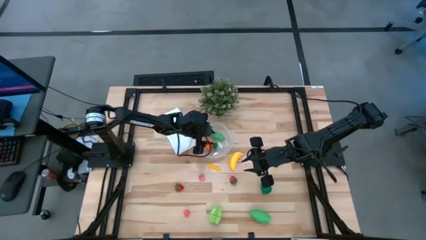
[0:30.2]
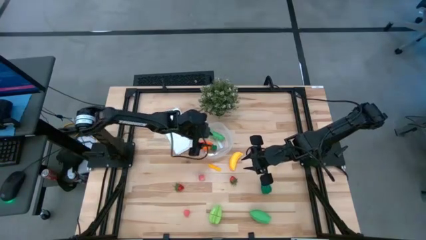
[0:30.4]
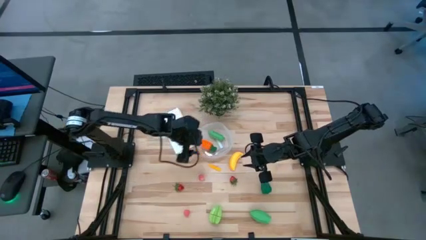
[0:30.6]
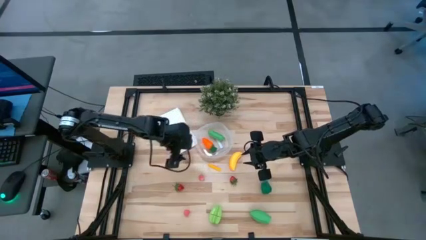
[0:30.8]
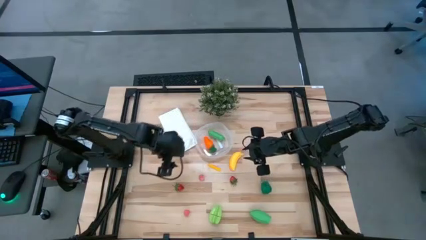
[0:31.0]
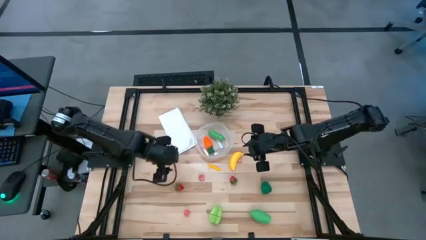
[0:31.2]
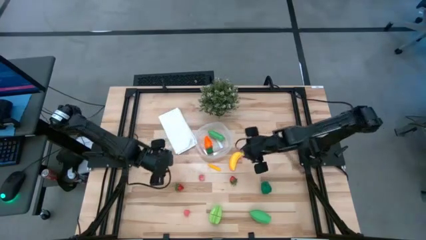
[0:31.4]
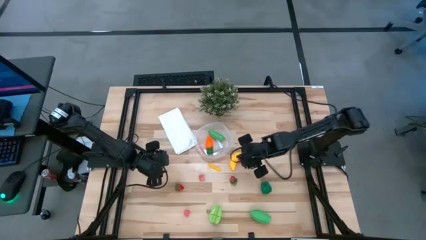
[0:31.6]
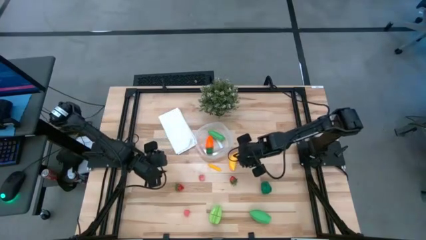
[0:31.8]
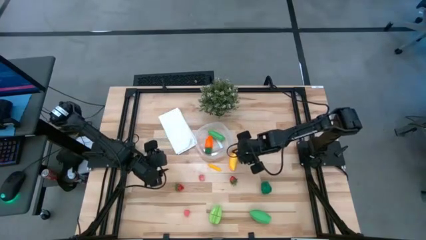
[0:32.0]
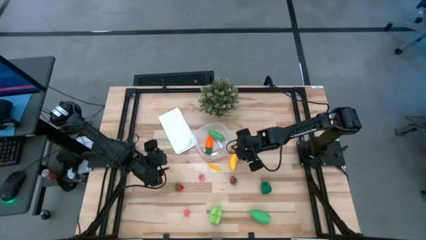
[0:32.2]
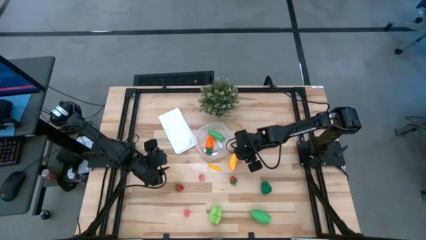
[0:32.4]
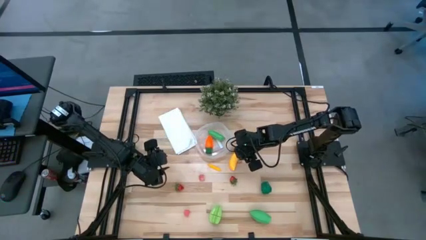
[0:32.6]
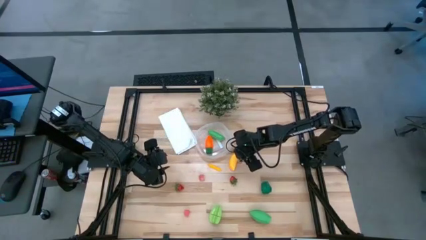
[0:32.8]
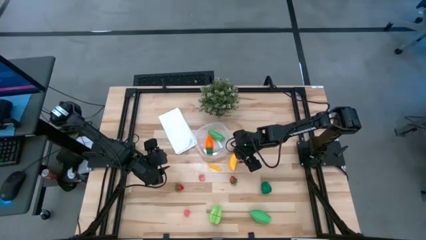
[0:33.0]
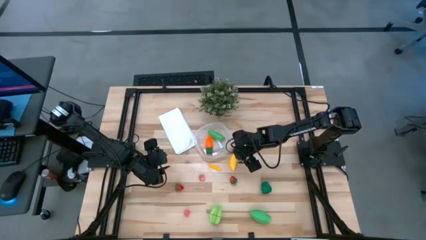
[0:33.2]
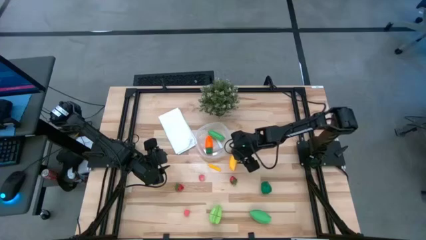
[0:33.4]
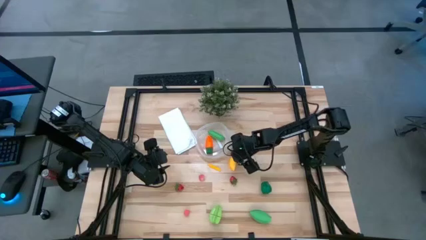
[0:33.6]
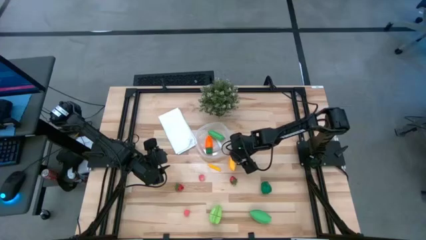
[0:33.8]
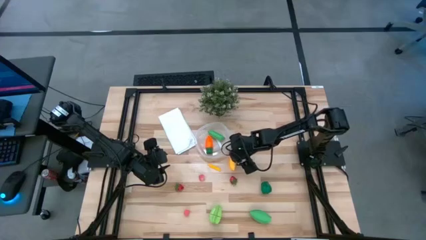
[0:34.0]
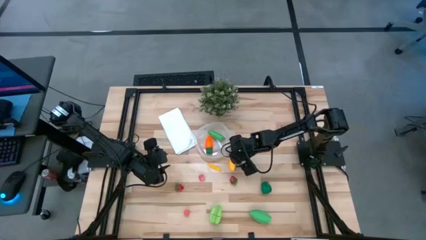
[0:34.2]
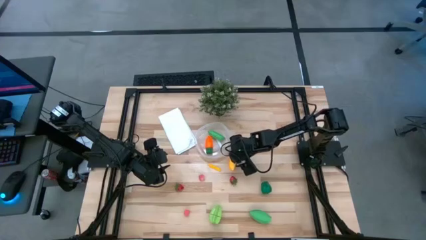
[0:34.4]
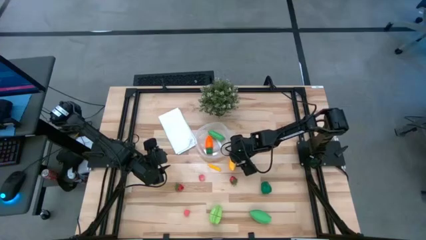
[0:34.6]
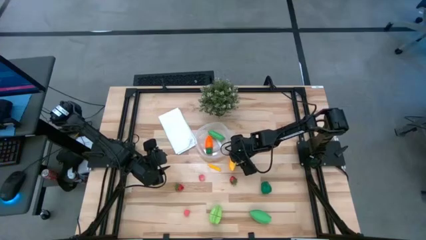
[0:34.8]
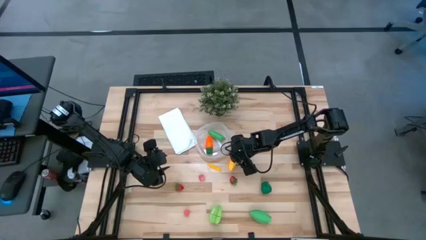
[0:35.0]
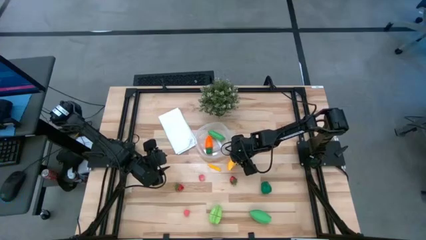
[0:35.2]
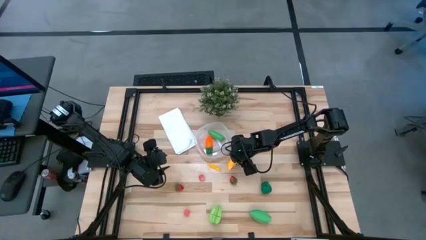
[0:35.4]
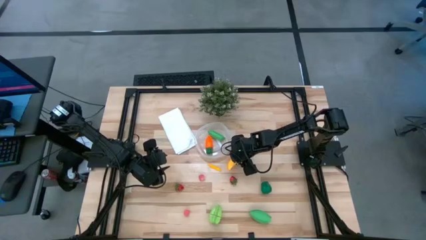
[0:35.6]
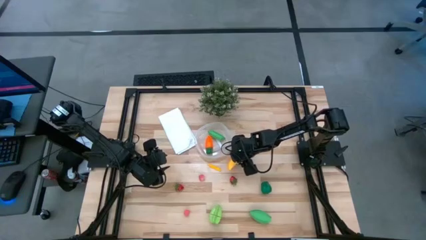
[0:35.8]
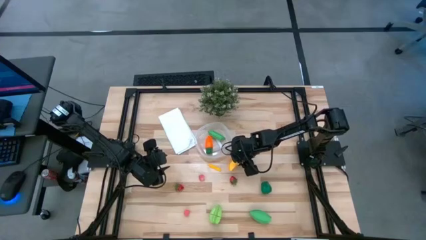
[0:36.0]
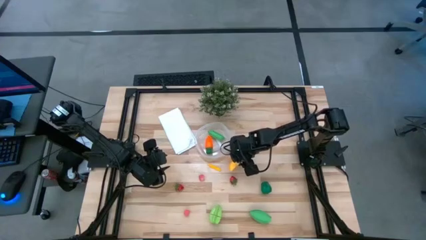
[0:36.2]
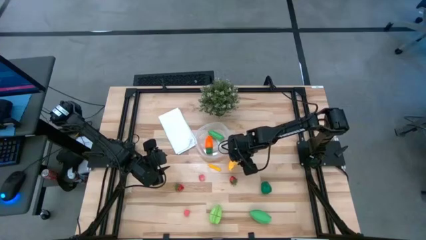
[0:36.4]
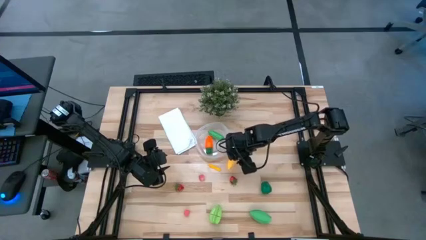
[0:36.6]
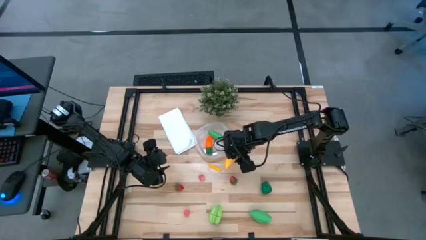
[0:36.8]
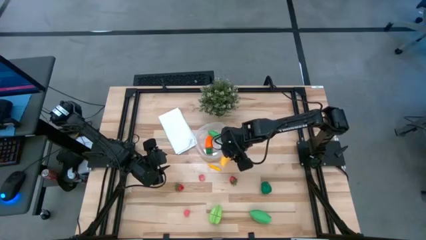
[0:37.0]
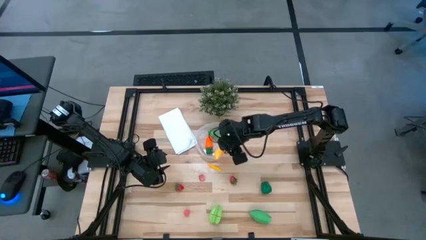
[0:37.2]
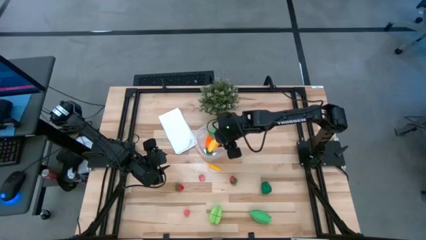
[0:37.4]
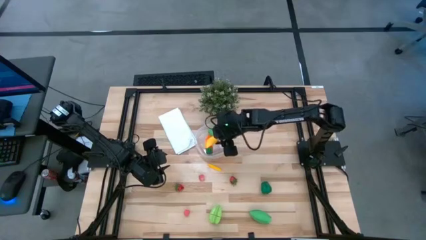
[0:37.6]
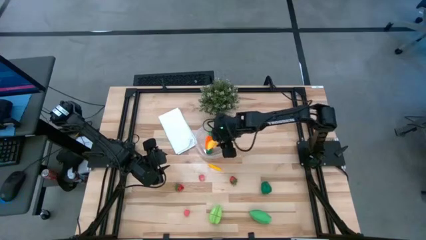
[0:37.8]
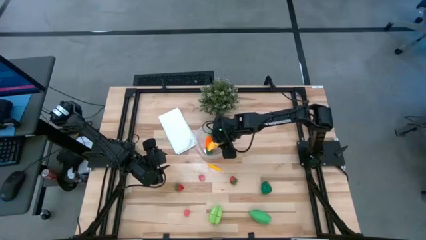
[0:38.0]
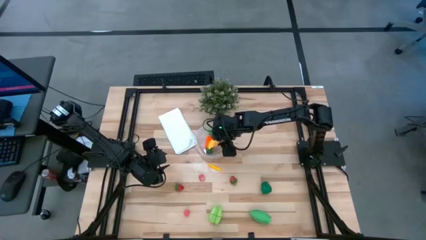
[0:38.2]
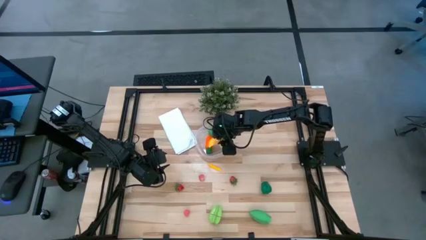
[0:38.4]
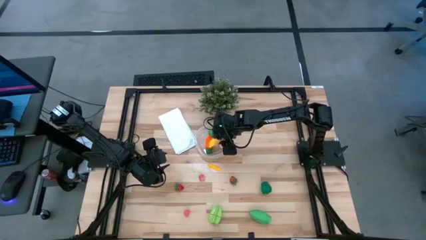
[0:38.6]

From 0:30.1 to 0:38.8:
Task: Pick and placing Produce into tupperware
Put the yellow banana into the transparent bin

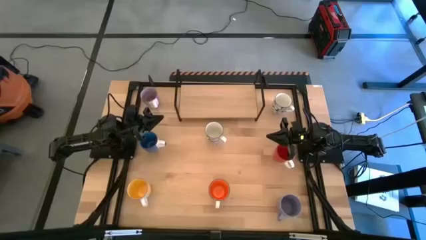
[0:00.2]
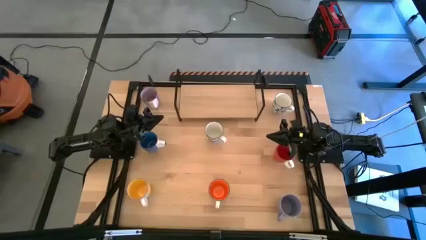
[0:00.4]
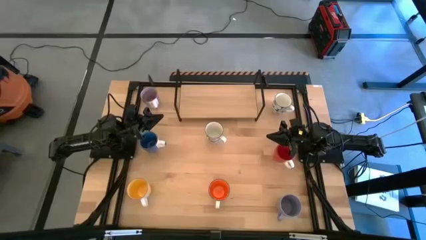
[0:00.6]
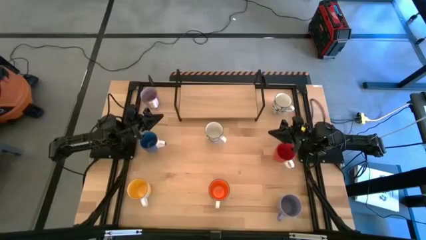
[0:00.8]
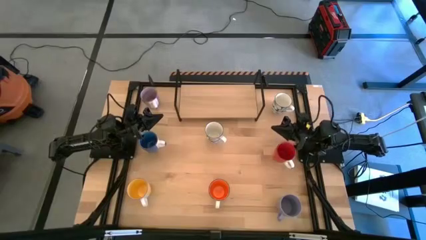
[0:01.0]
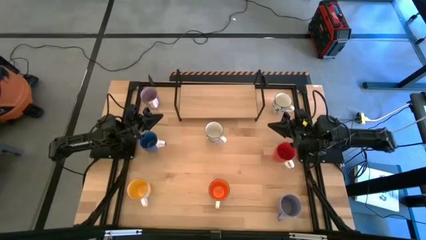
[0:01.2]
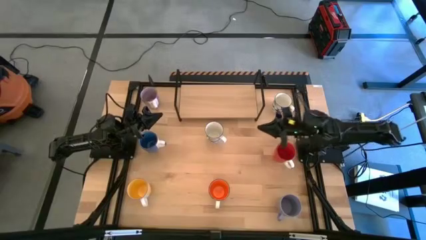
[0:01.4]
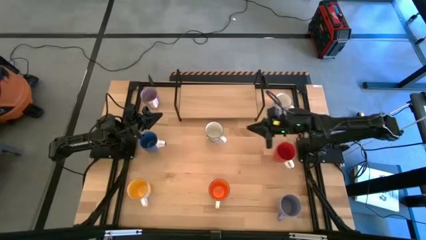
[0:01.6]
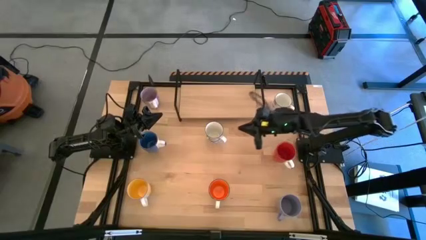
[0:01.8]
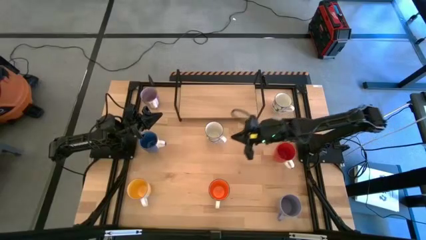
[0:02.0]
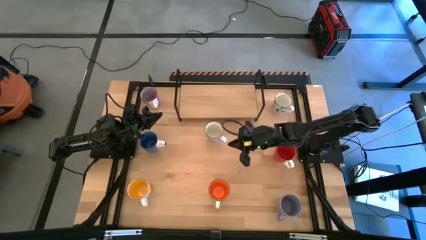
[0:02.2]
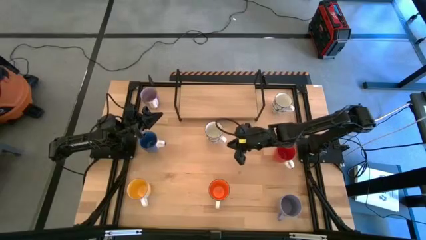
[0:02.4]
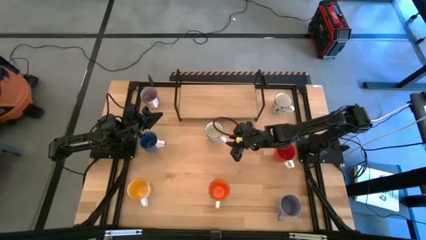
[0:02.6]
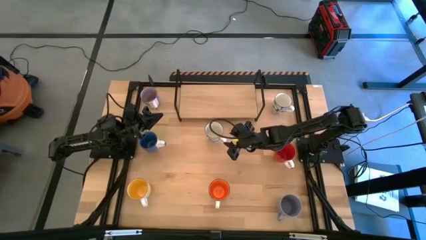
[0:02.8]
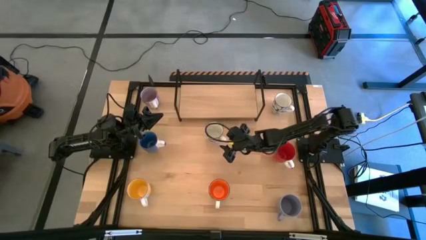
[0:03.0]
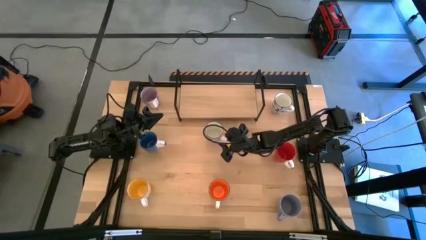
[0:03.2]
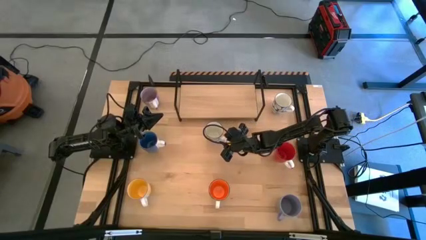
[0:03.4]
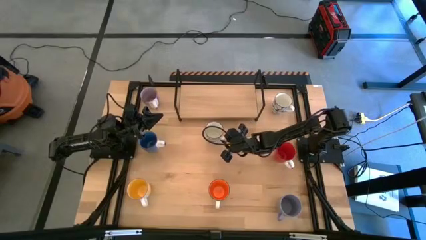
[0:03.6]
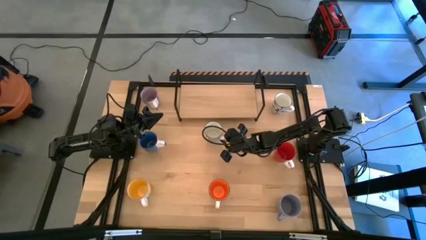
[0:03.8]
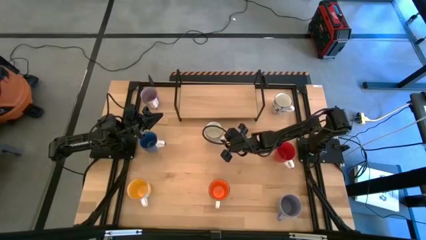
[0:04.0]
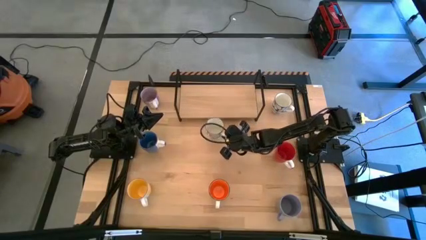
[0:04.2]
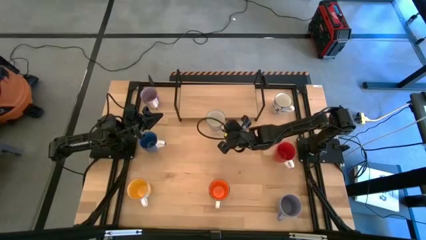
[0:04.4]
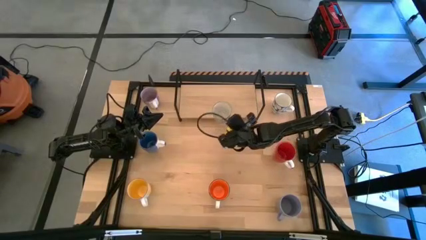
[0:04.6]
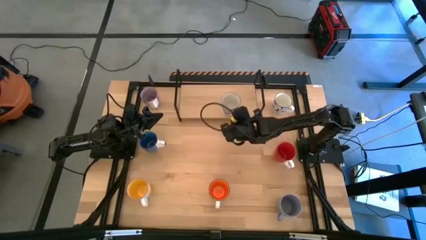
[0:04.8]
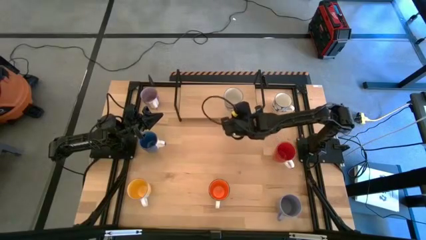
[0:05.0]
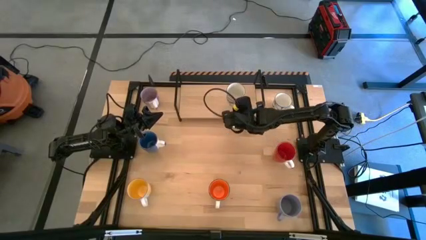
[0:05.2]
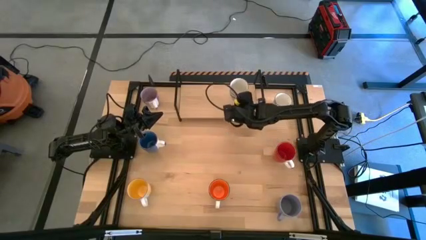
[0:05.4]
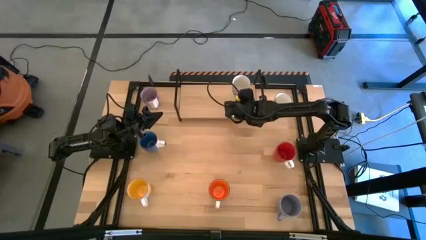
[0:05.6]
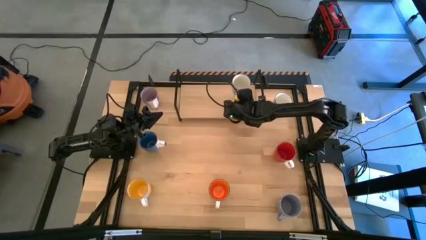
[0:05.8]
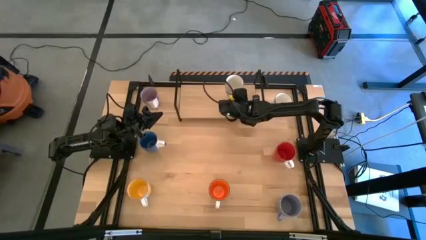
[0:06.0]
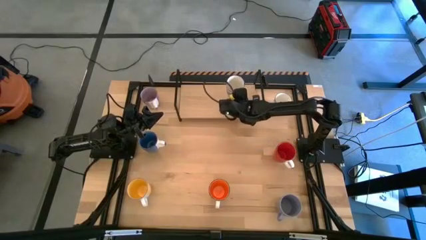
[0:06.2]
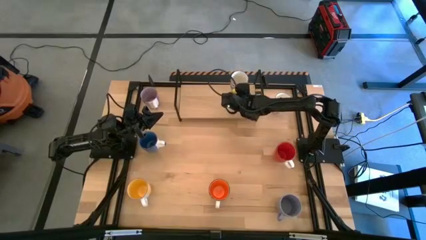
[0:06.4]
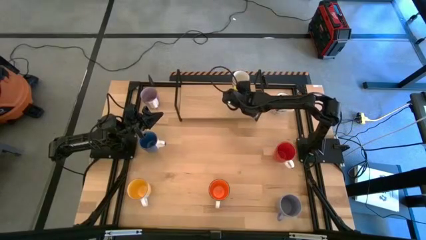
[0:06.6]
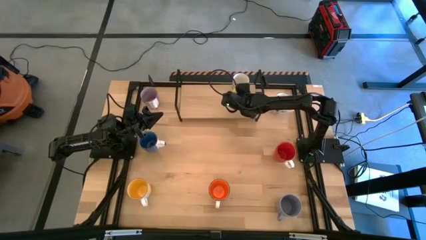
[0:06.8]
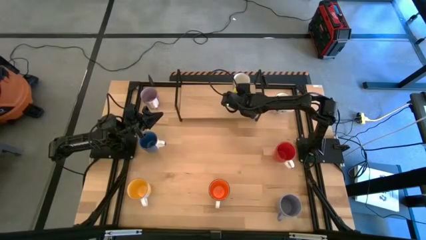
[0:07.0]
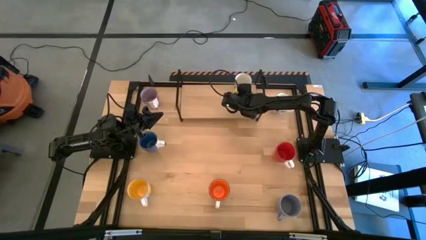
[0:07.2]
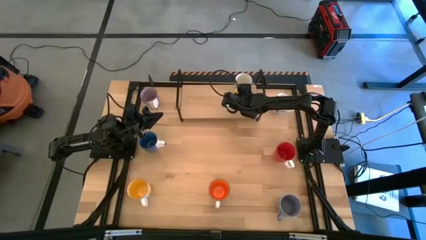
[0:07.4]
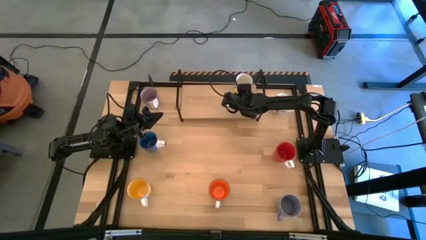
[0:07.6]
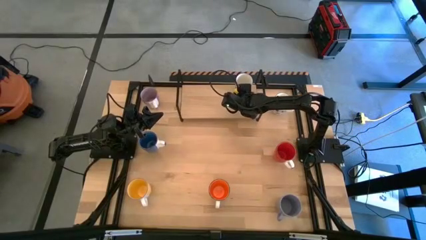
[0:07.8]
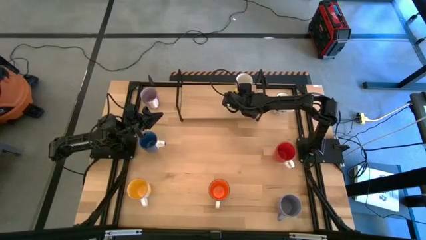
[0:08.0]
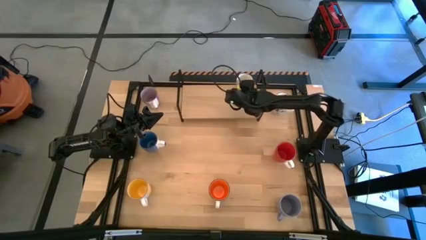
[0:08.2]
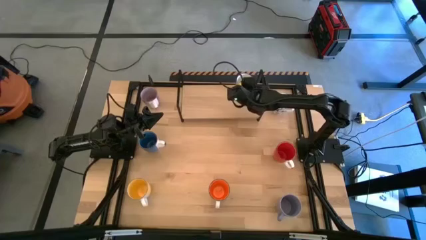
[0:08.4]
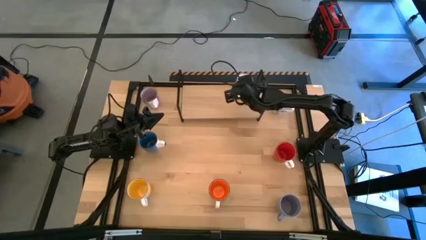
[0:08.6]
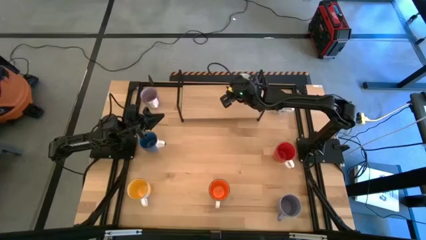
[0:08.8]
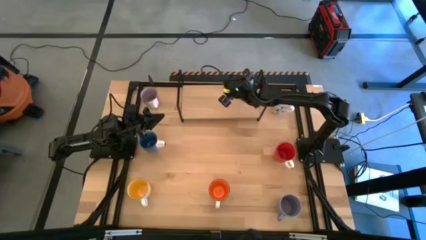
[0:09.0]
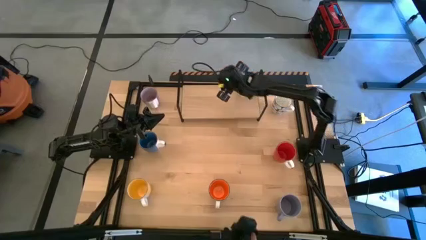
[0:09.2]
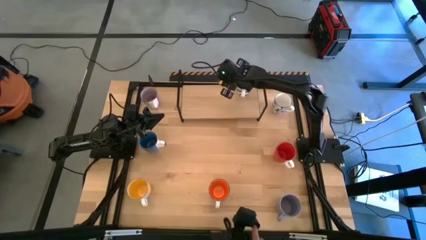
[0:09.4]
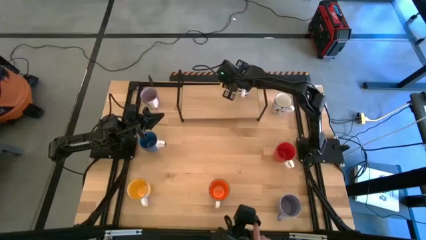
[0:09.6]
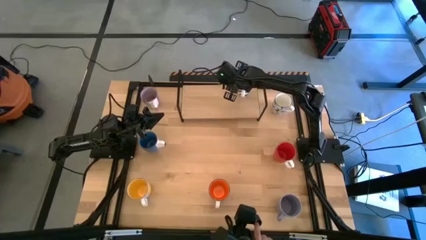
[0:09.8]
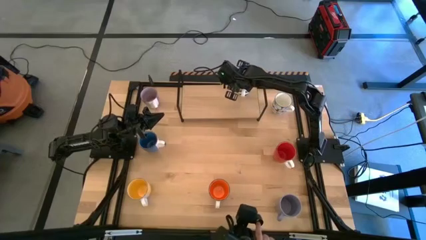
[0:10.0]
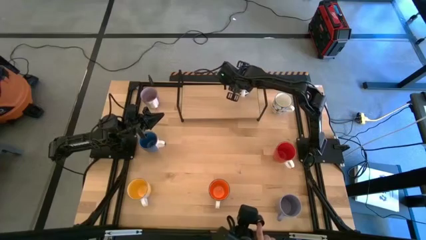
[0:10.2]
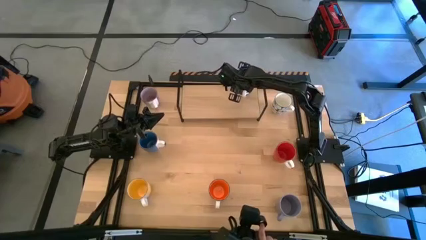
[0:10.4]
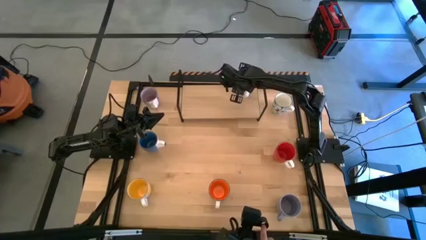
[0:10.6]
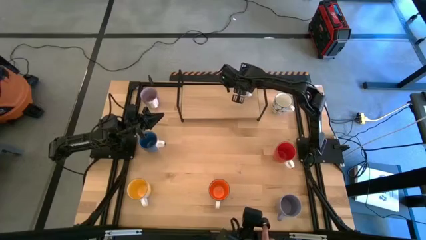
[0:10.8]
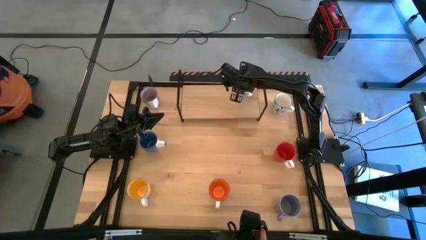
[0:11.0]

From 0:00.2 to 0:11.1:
Task: Place coffee mugs
Put the left blue patterned mug on the shelf
